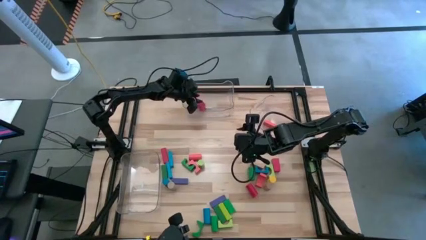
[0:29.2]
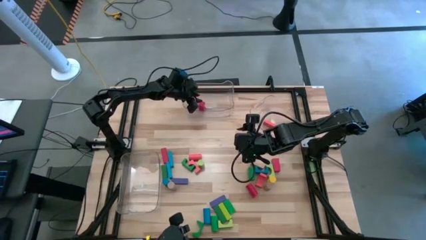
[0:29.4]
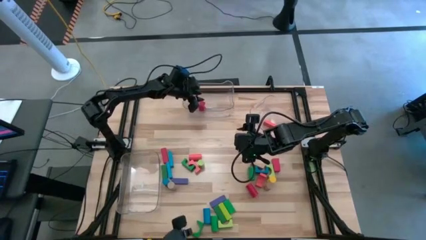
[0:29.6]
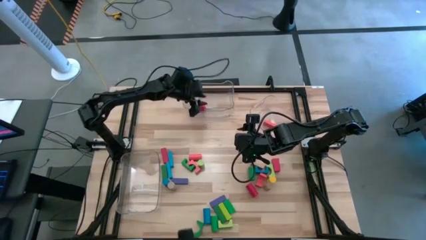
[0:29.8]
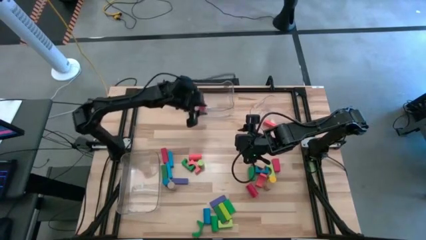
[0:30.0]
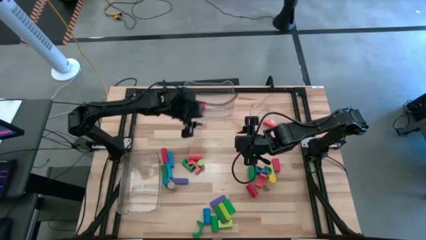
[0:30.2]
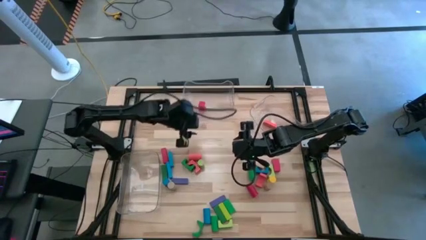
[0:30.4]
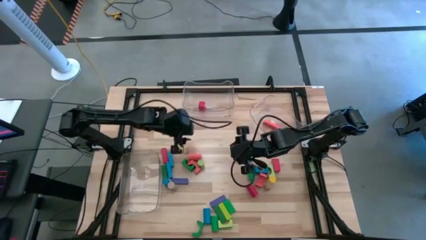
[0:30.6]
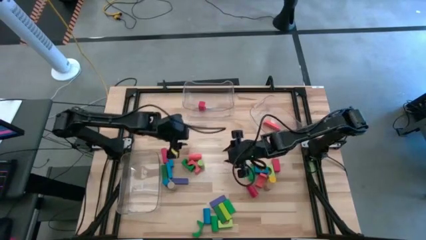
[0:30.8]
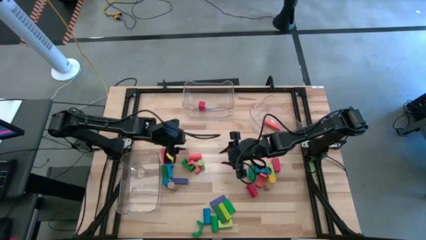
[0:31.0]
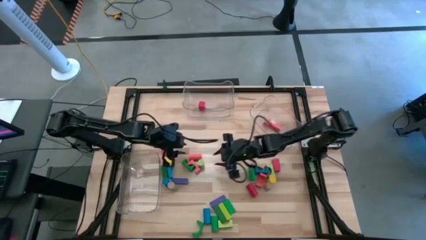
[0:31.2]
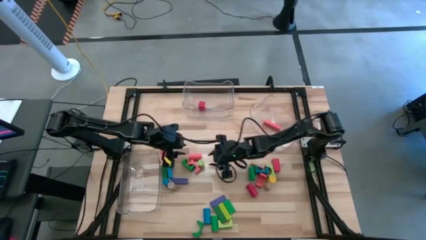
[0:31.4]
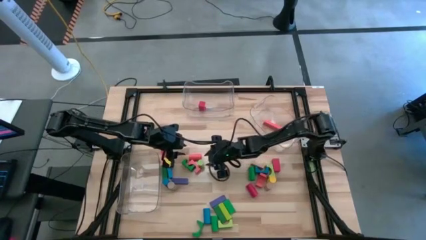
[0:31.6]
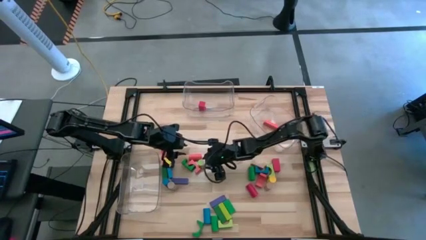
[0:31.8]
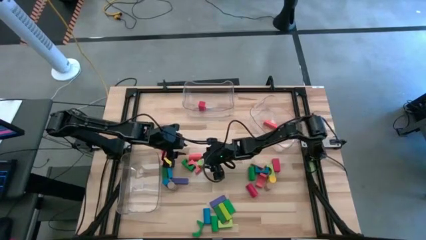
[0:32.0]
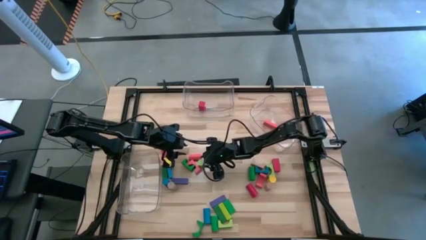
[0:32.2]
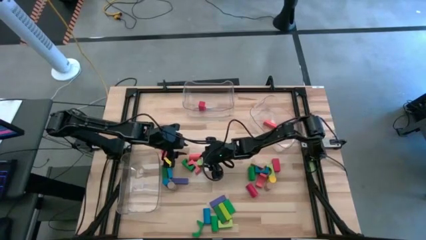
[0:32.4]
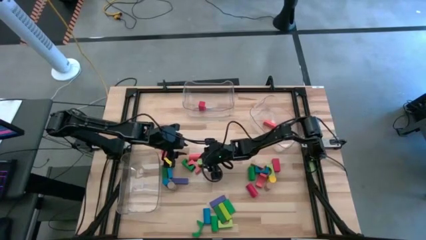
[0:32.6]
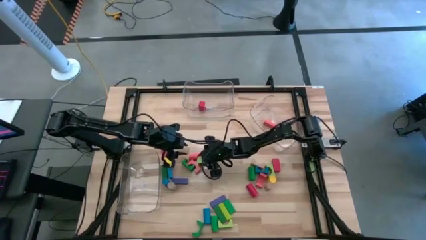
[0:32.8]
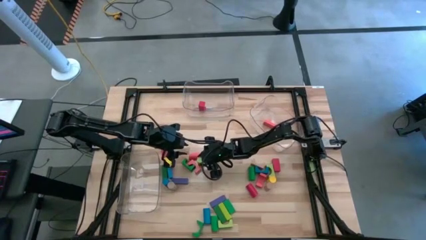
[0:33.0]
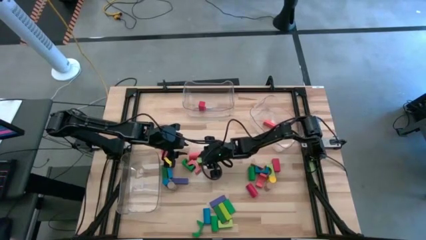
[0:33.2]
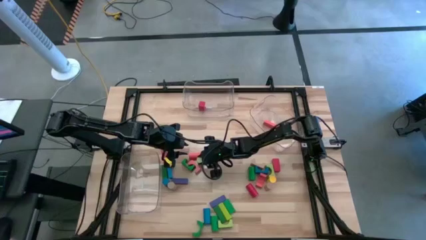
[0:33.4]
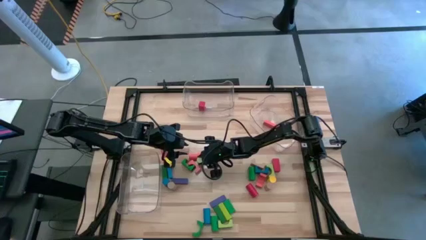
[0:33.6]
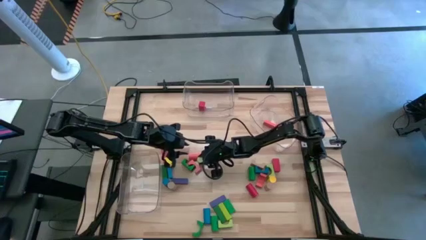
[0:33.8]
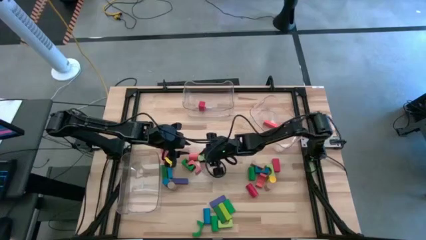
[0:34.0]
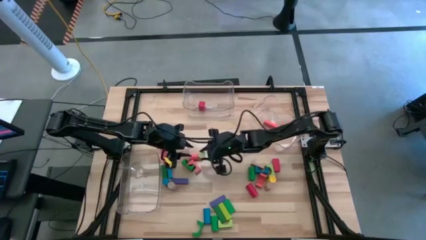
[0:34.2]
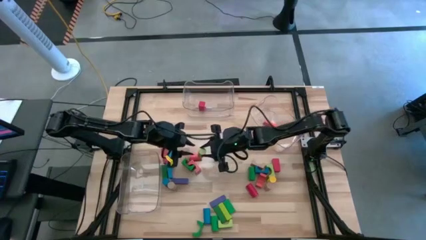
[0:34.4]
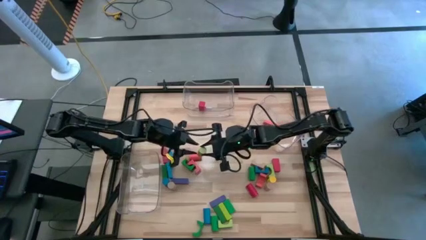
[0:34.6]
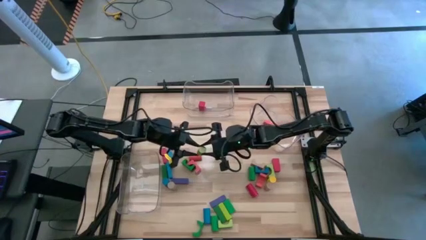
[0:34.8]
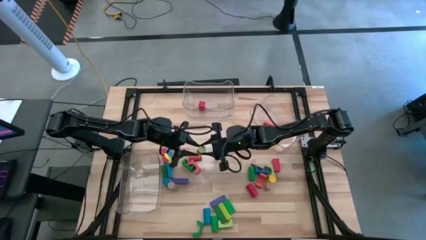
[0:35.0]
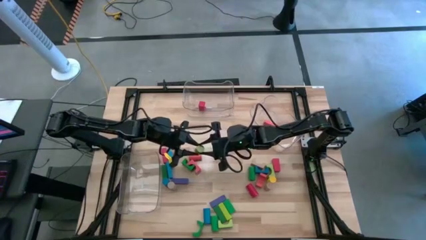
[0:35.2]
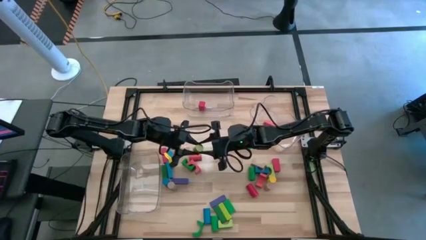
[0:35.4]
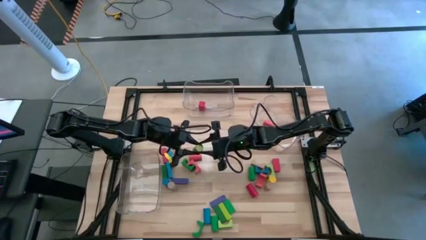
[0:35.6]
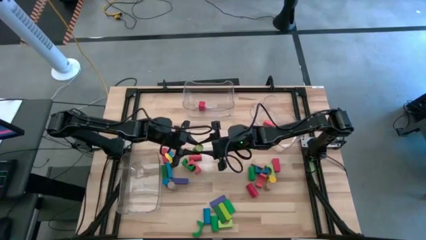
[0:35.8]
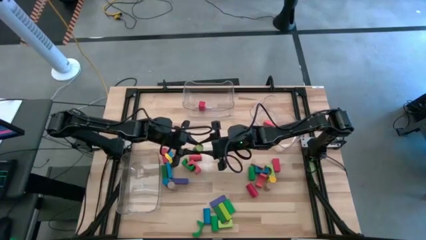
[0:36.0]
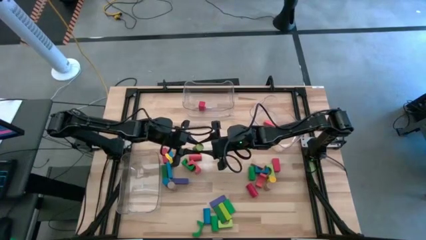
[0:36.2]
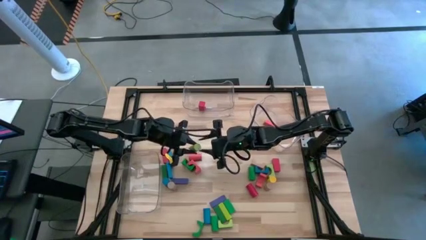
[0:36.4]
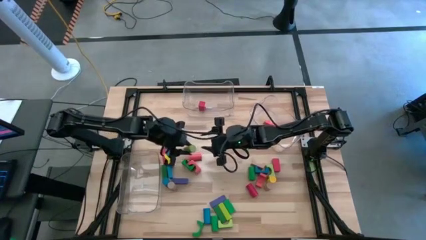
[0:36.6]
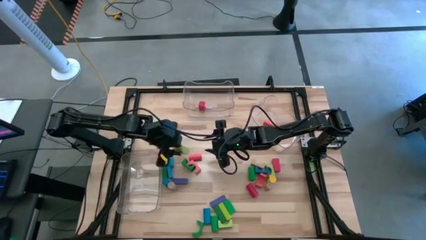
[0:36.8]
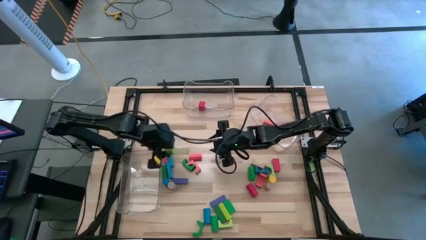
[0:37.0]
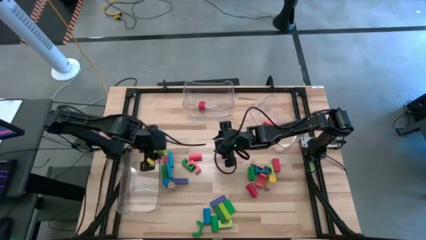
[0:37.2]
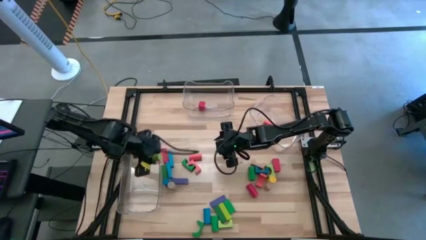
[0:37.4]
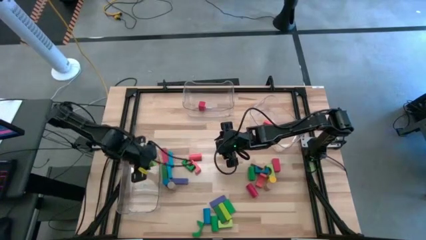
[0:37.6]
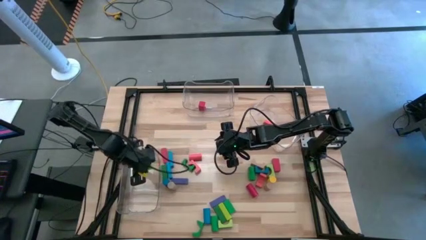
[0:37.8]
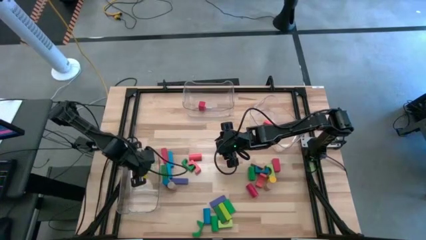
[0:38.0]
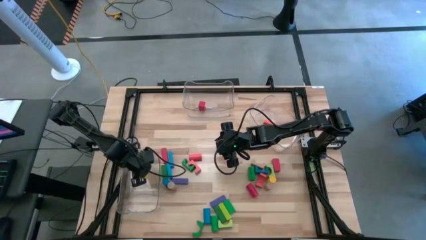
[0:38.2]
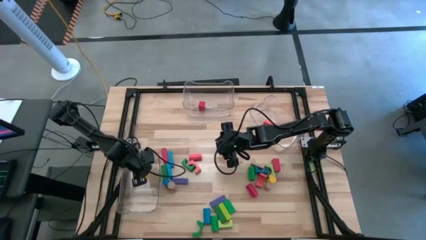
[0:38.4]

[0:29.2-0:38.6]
Task: Sort blocks by size
Put the light green cylindrical block into the left transparent bin

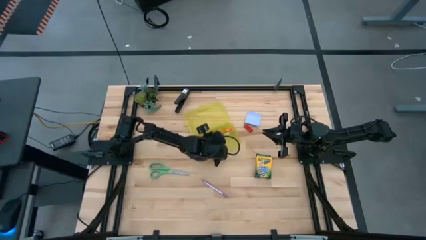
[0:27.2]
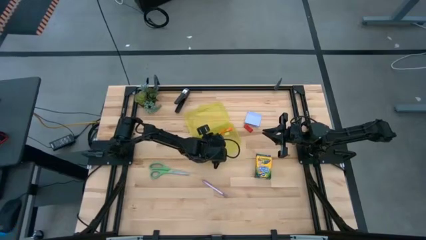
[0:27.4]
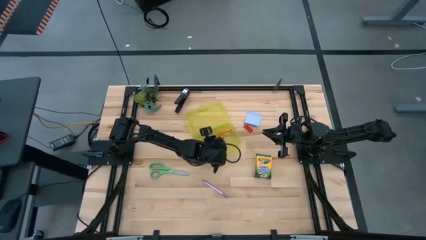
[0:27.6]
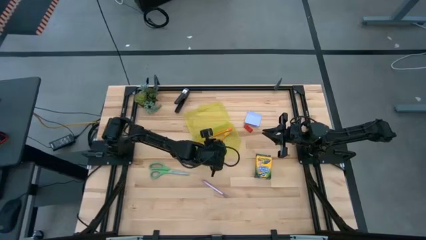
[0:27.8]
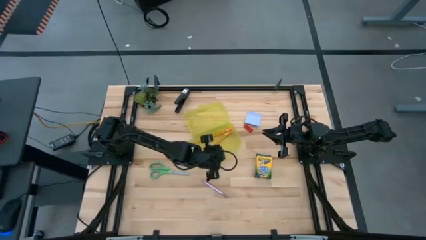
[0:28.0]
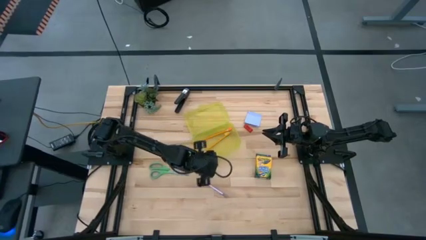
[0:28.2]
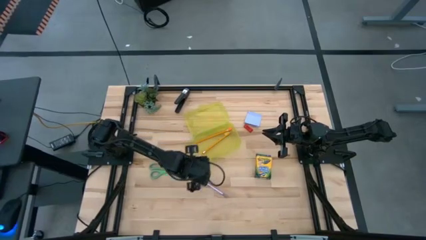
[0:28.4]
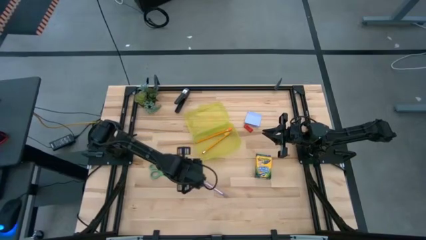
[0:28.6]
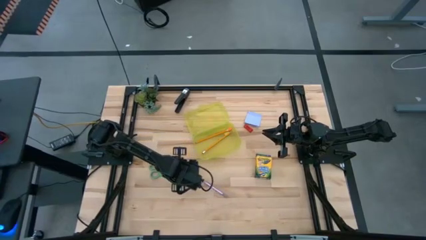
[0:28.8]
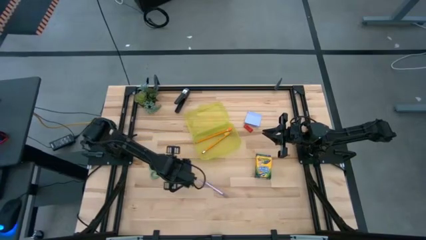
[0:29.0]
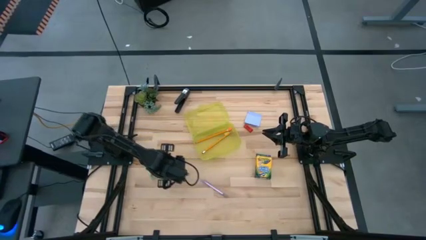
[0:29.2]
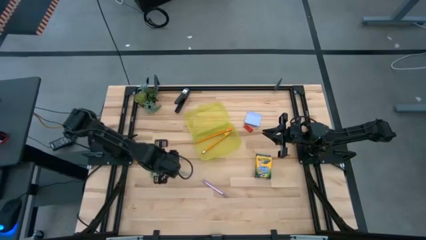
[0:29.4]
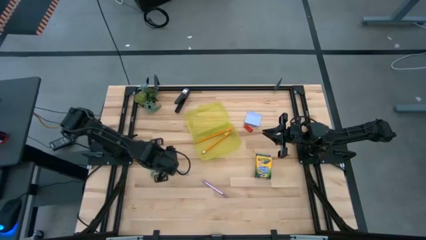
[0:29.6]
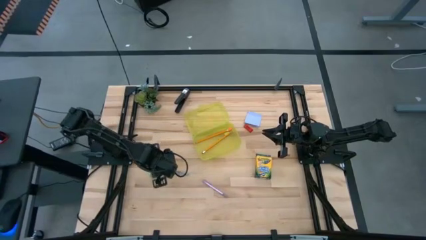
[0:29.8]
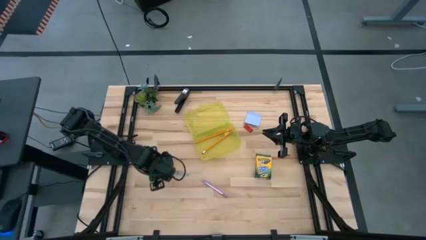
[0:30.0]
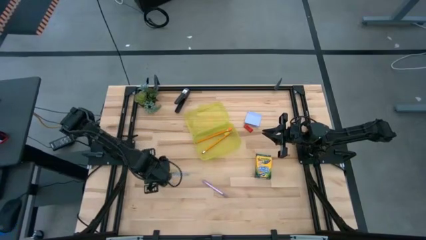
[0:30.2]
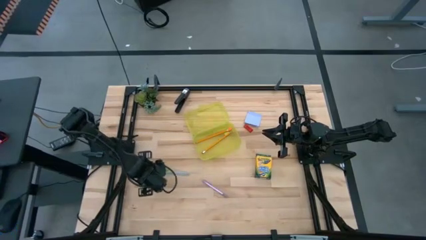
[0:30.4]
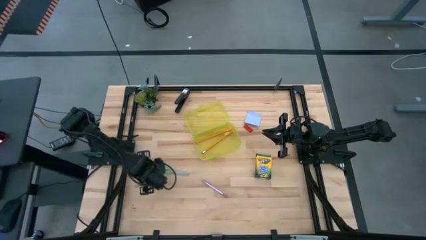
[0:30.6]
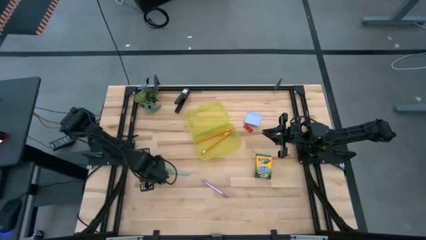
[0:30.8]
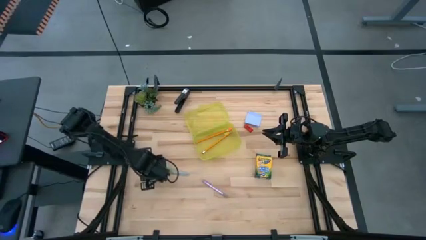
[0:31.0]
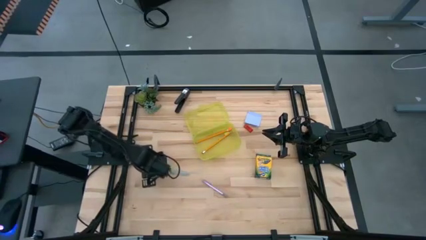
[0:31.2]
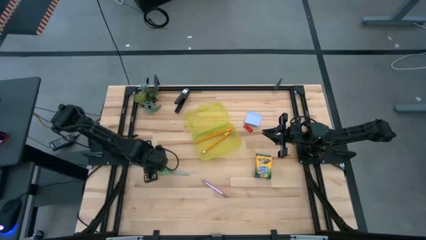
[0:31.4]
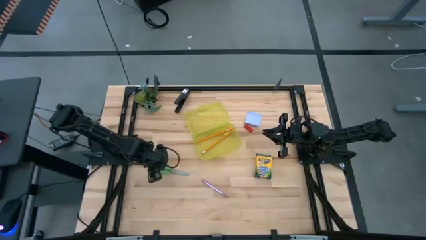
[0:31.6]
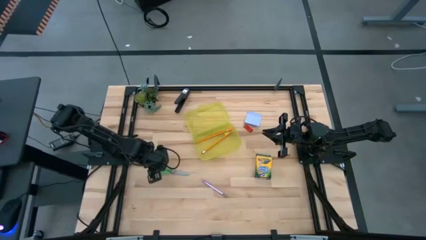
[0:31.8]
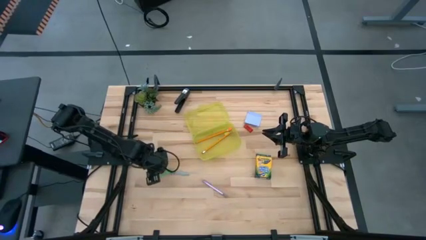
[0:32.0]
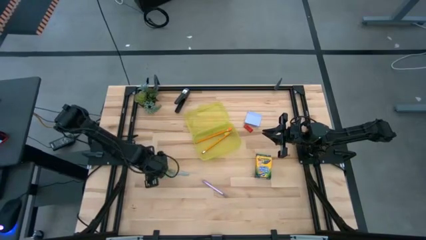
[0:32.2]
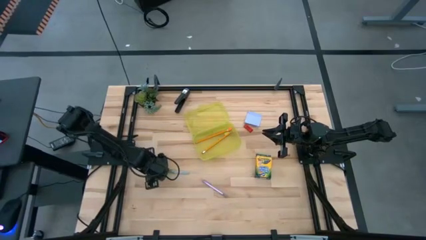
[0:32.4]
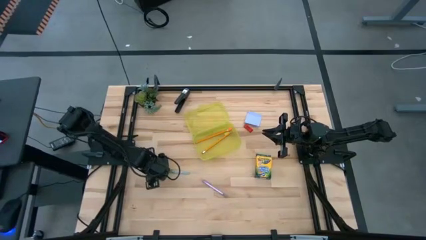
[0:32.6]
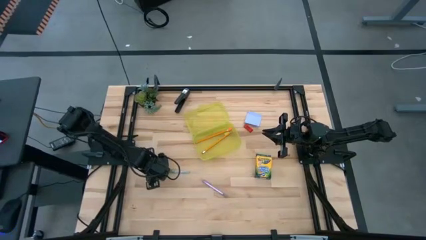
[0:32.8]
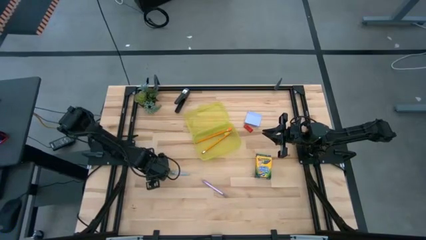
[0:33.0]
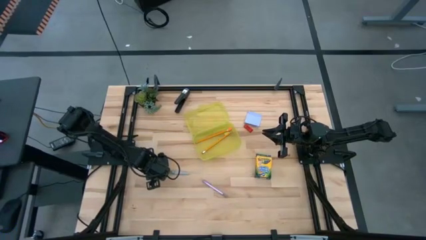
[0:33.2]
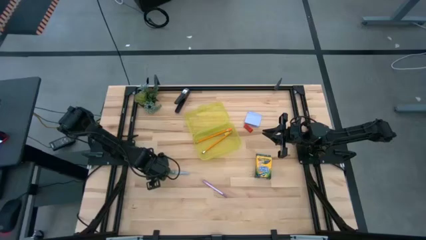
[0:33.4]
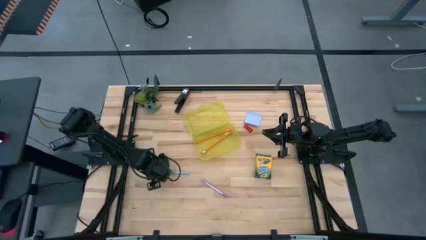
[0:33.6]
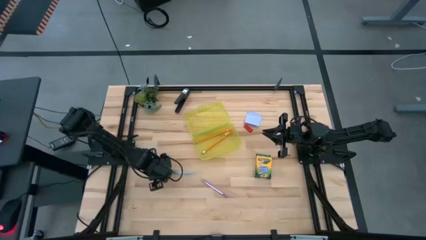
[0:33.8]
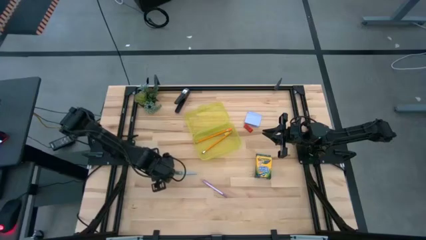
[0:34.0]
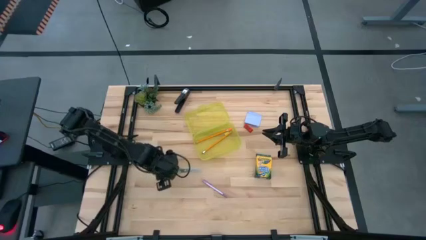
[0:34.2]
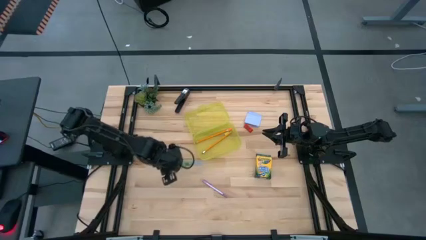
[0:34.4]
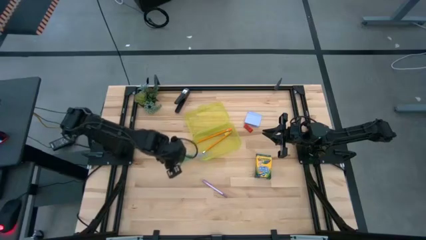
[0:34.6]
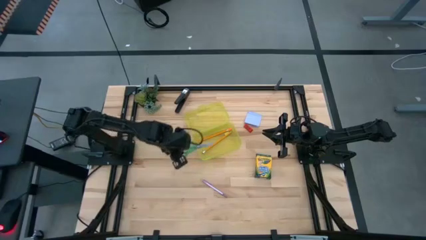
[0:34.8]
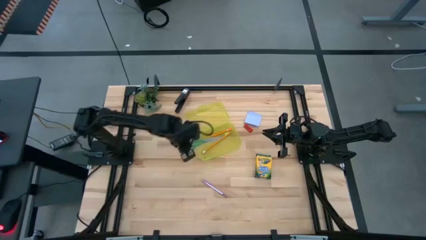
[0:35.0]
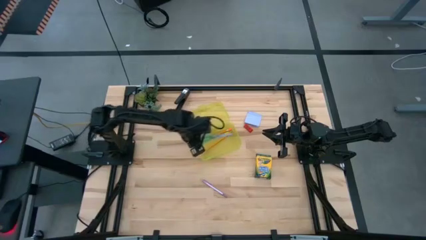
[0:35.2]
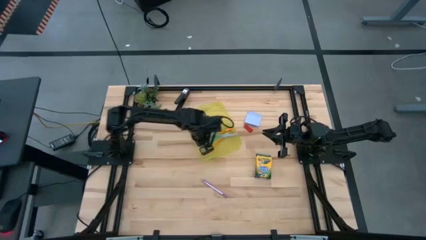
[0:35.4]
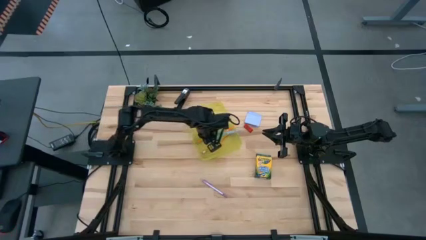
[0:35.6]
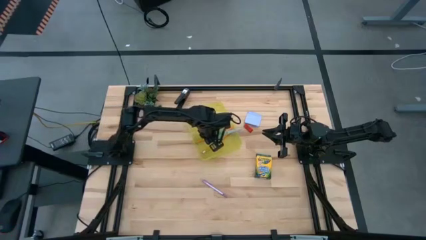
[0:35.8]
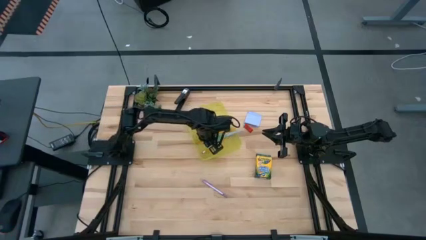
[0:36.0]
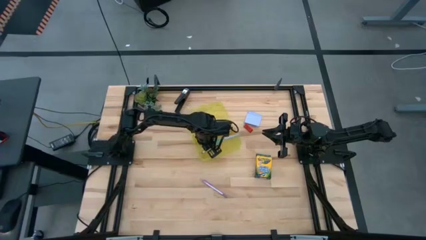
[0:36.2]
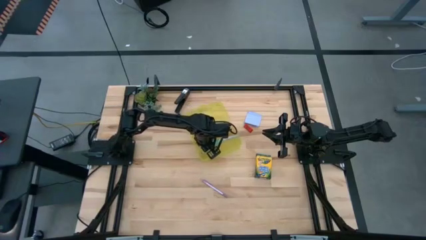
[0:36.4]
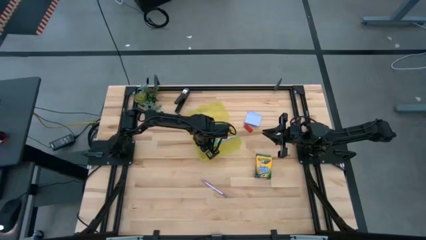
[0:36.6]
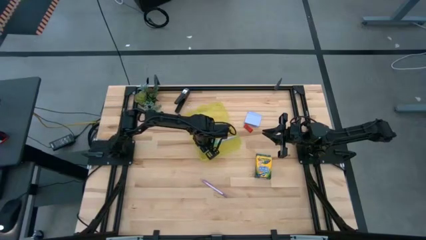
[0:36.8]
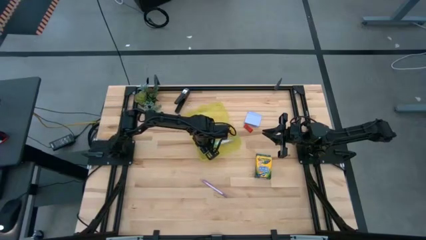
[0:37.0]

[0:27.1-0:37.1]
Task: Pack school essentials
Put the green scissors into the yellow supply box
